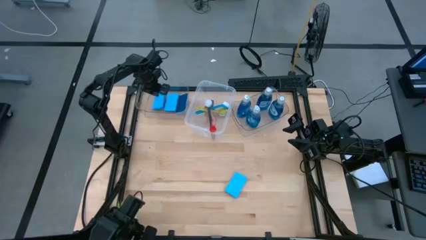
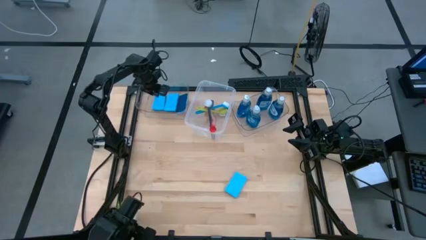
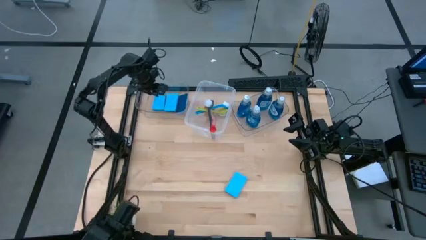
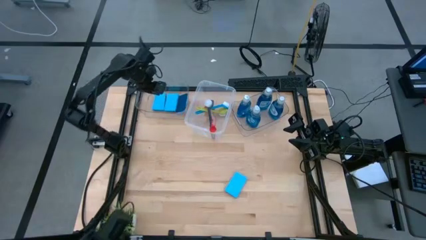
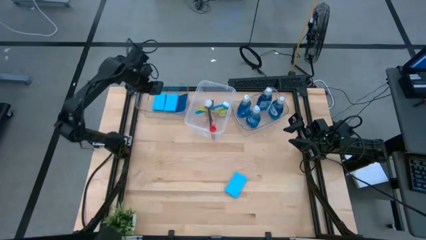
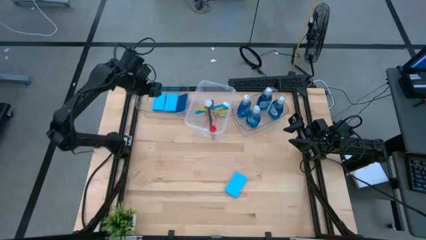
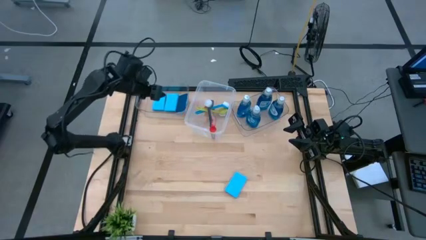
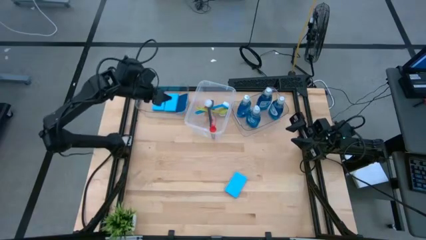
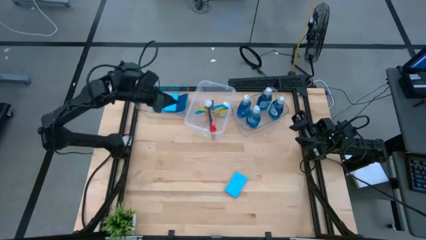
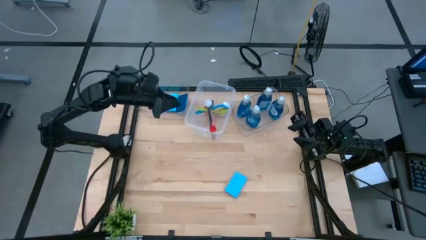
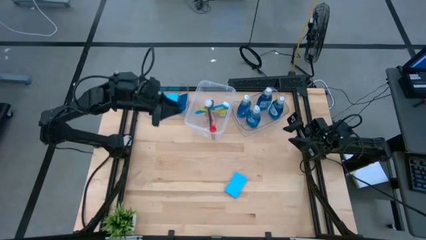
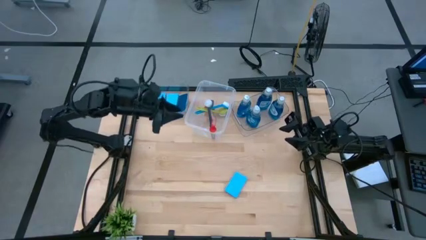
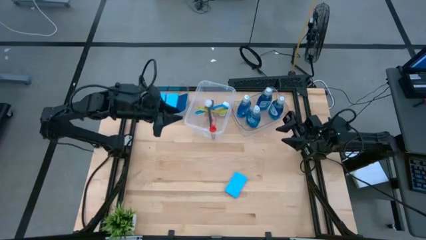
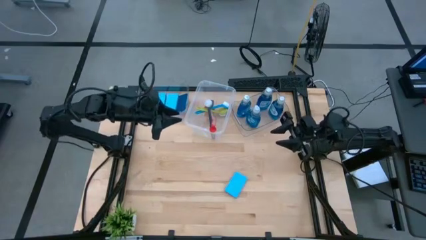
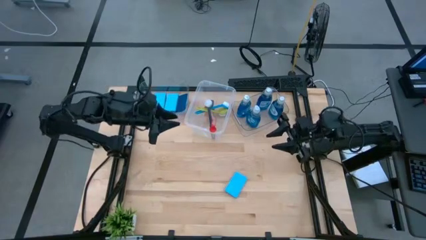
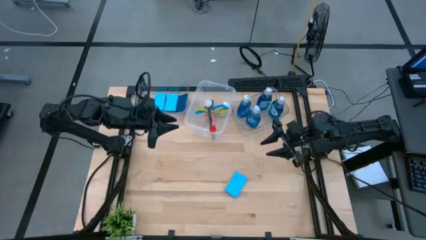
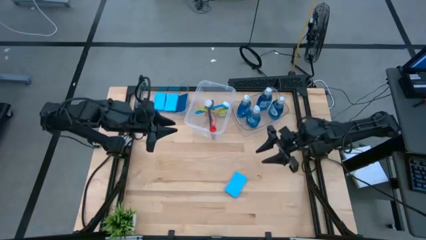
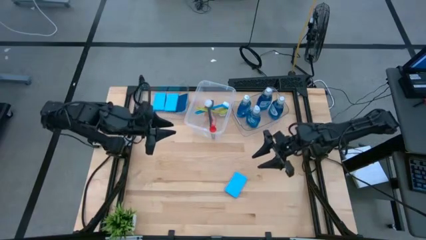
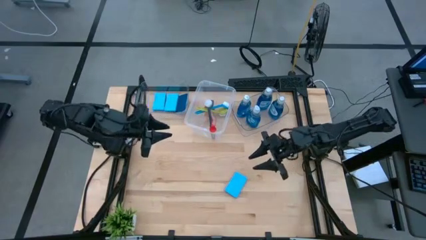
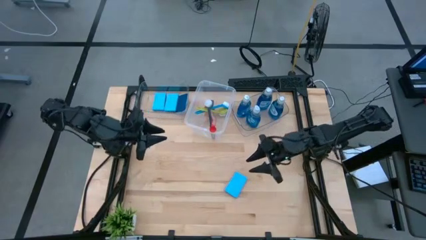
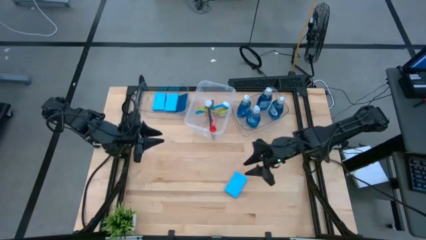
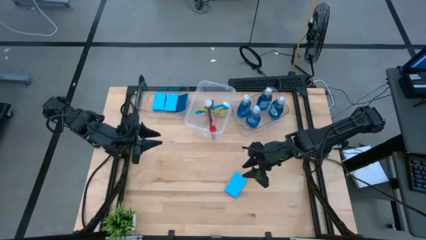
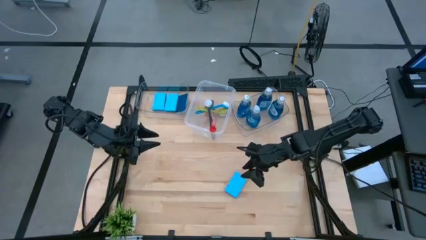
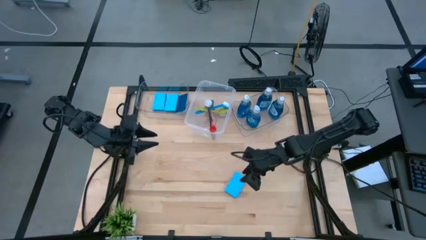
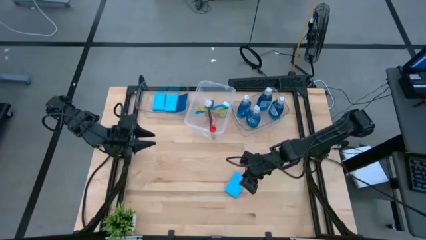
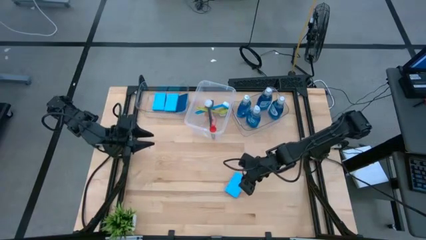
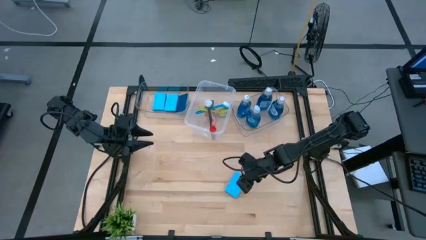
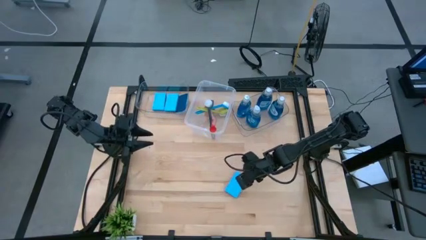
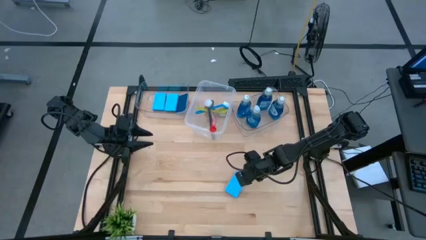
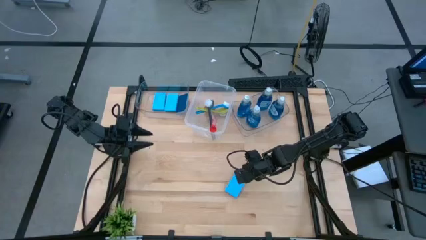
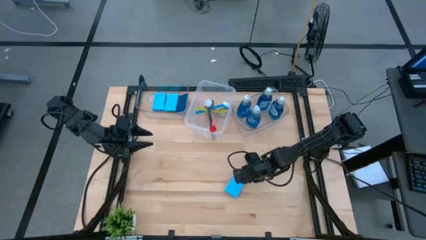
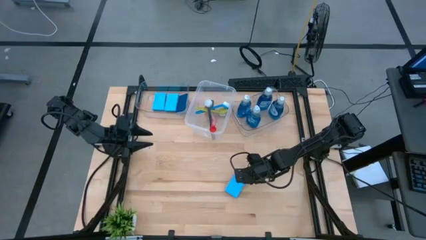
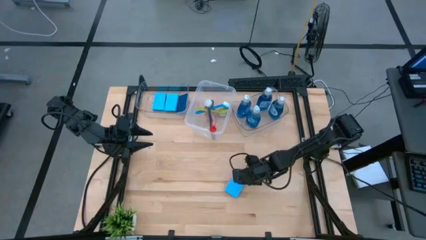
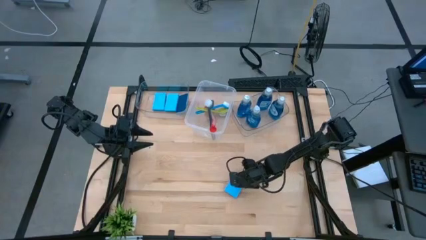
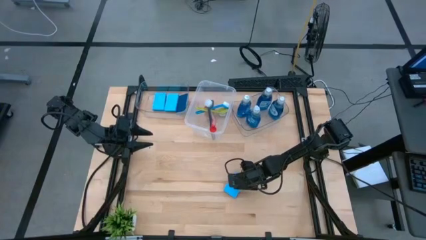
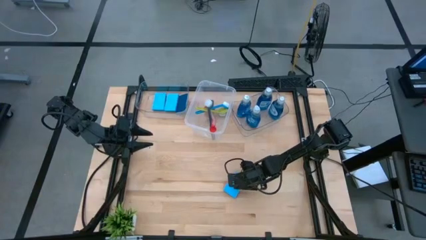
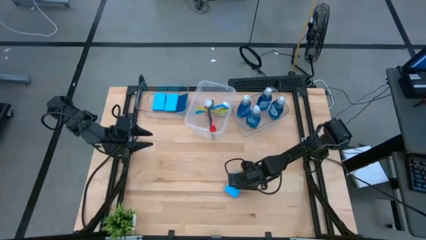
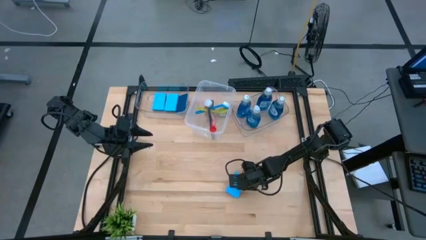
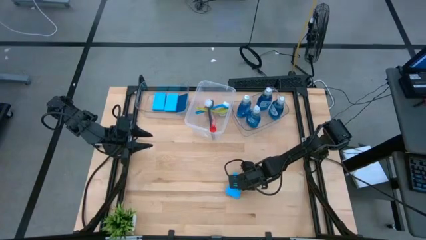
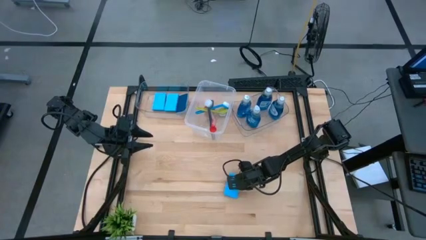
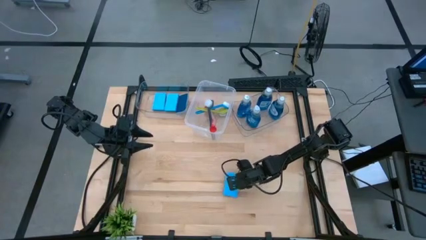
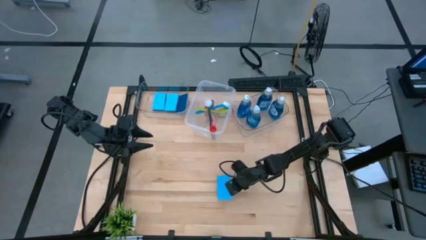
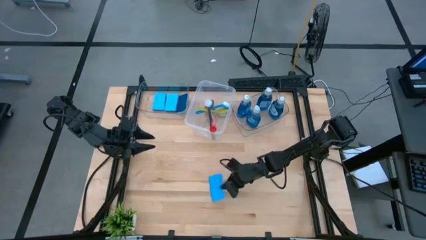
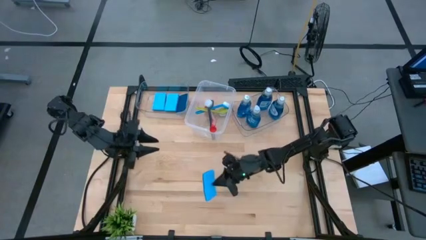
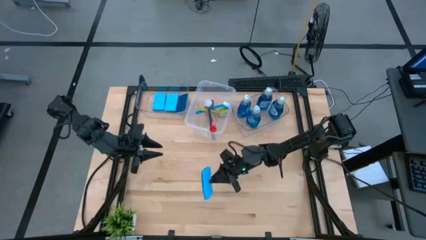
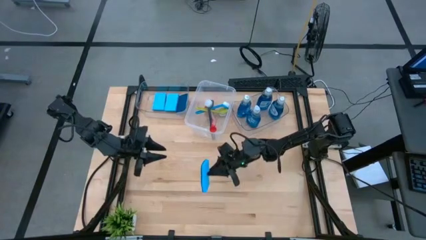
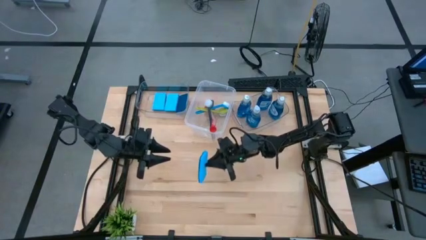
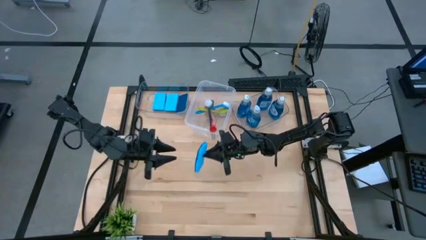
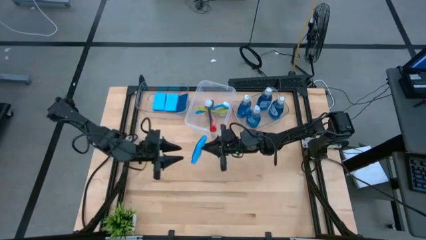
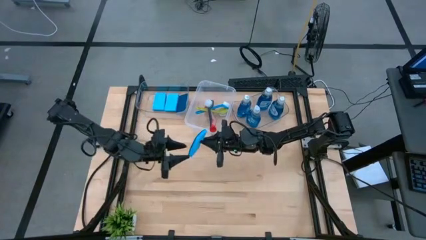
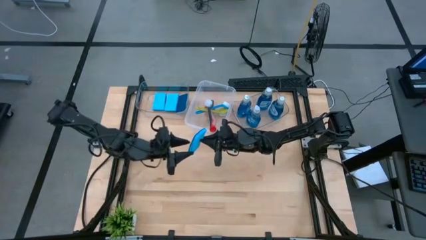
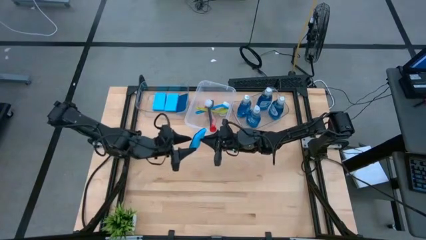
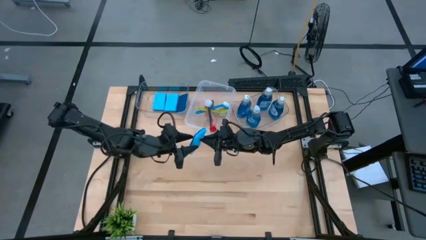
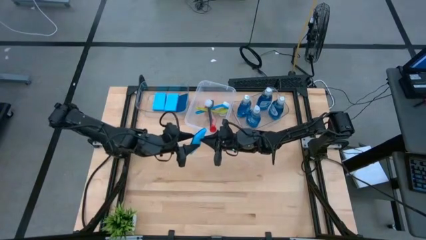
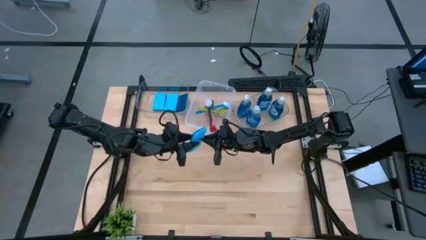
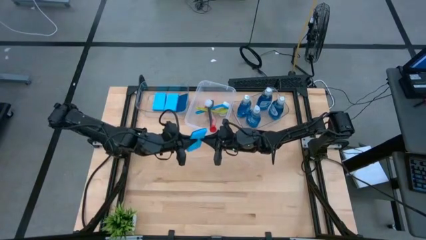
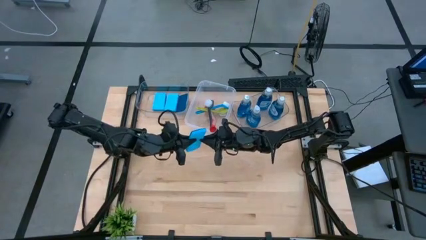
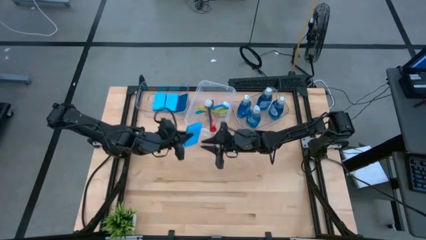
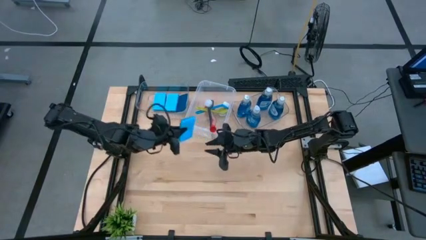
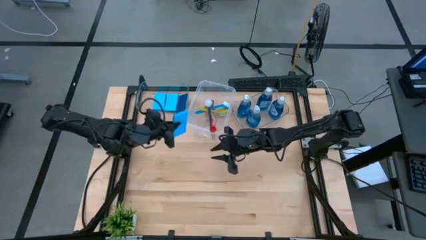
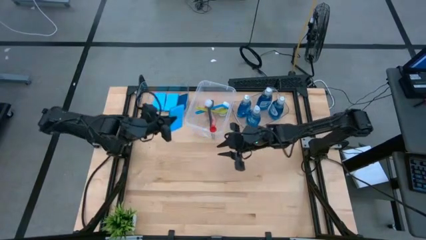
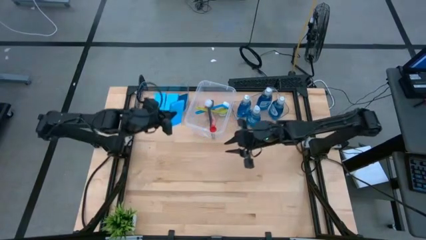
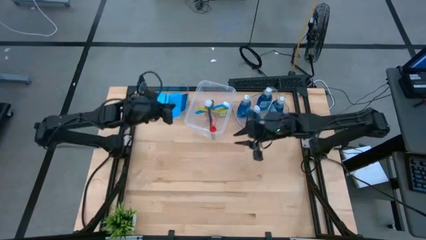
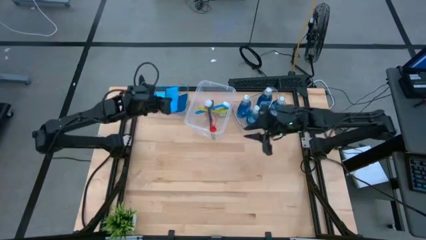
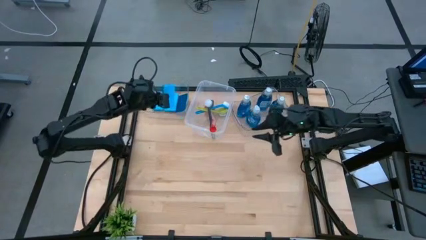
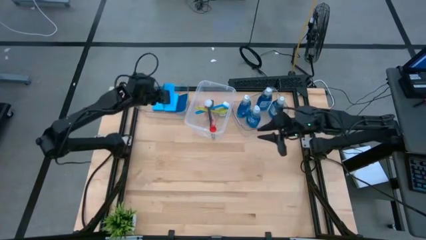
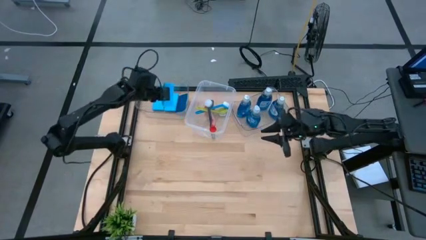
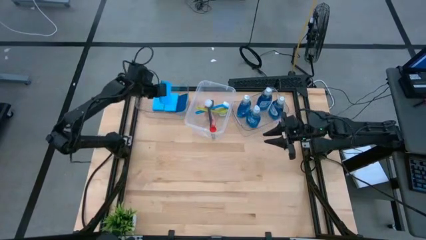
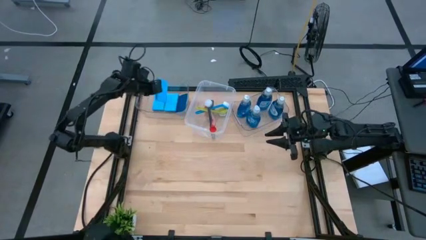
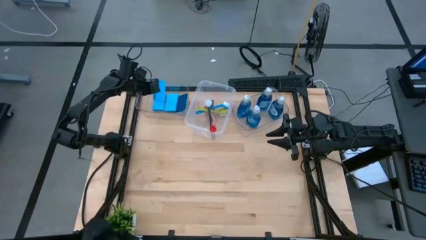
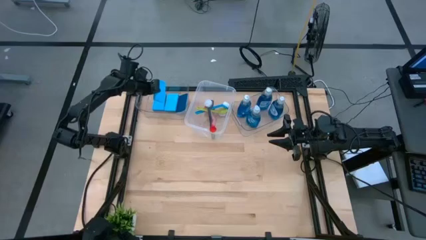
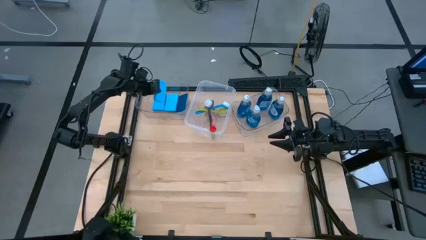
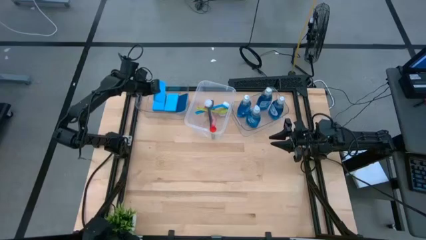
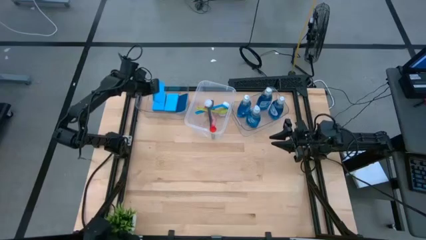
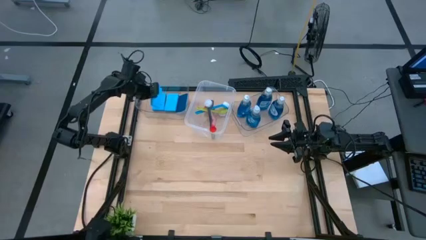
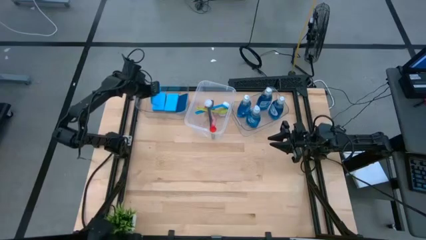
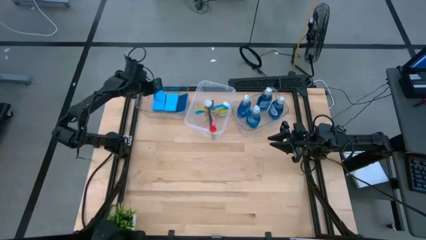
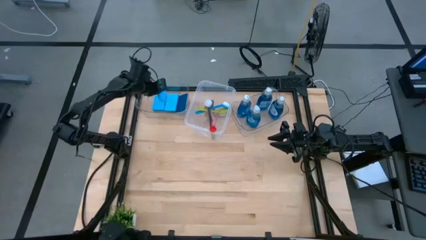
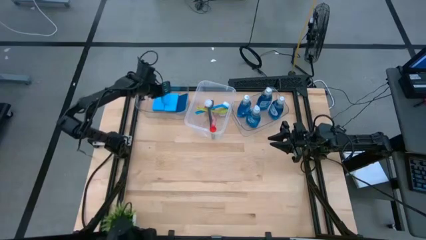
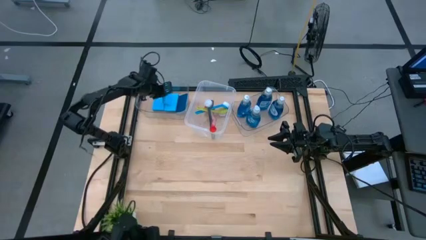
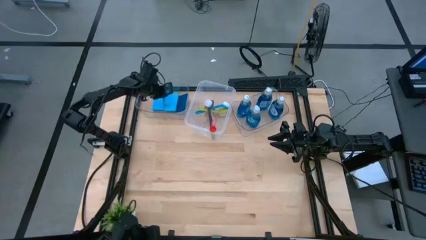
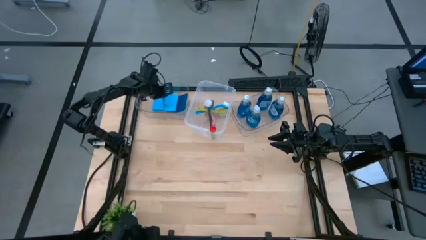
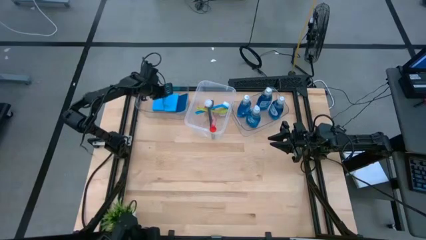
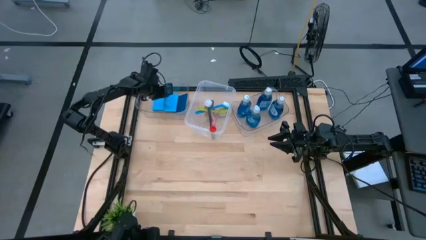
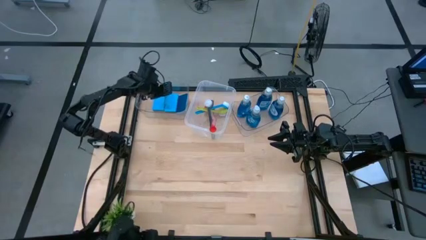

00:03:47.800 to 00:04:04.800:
Task: Pick & Place Kitchen Sink Supplies
Put the blue sponge into the left transparent bin
